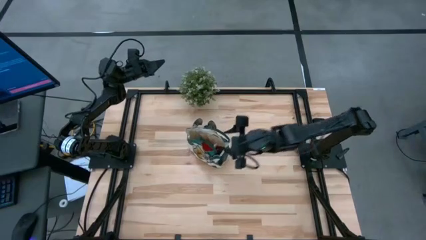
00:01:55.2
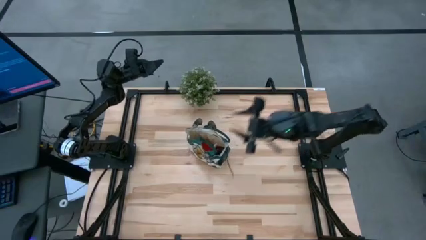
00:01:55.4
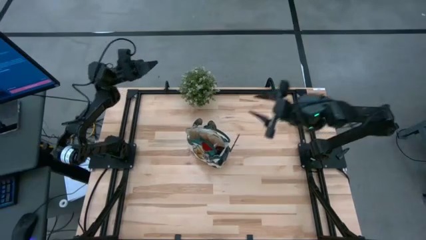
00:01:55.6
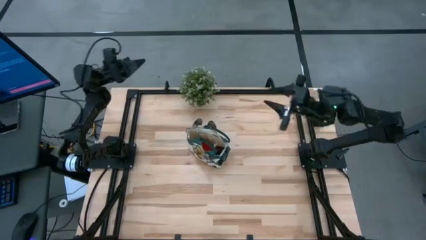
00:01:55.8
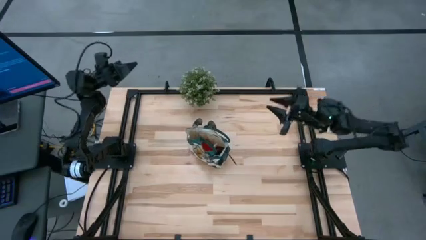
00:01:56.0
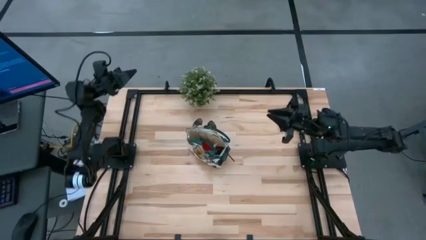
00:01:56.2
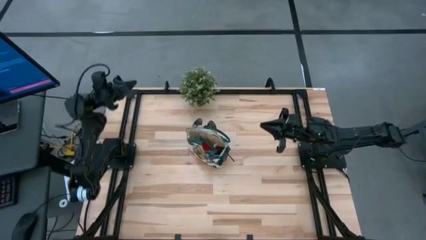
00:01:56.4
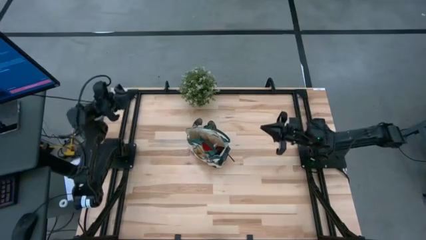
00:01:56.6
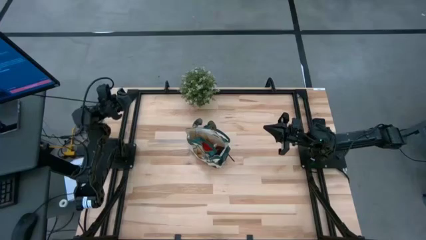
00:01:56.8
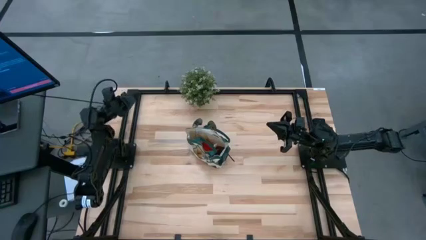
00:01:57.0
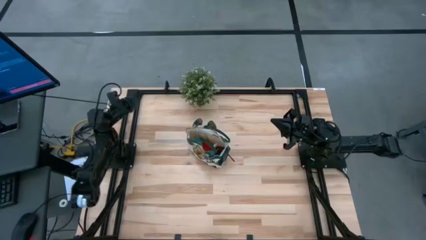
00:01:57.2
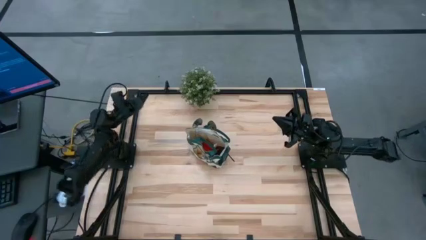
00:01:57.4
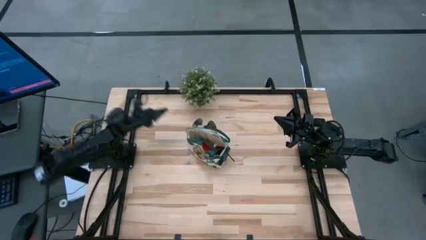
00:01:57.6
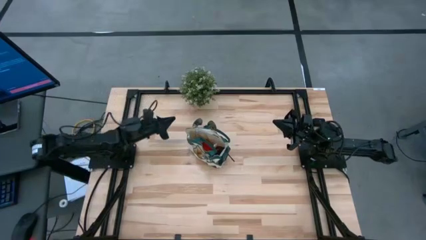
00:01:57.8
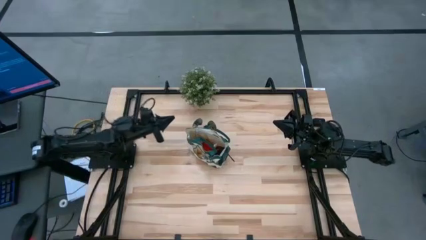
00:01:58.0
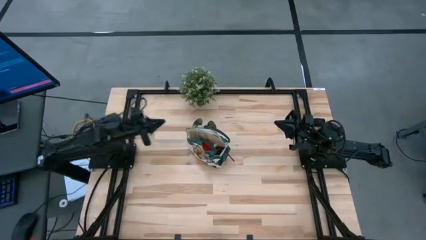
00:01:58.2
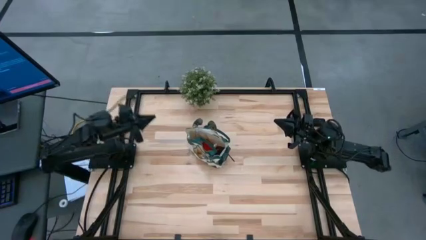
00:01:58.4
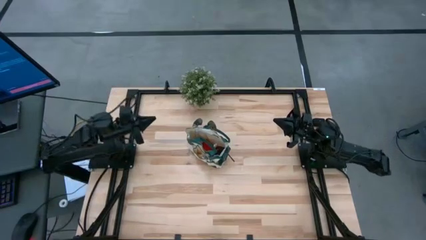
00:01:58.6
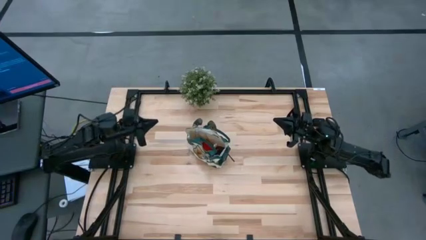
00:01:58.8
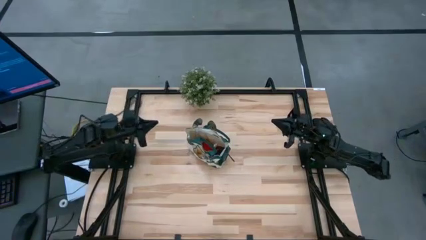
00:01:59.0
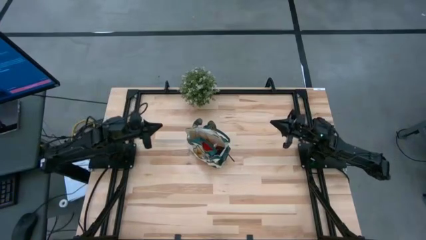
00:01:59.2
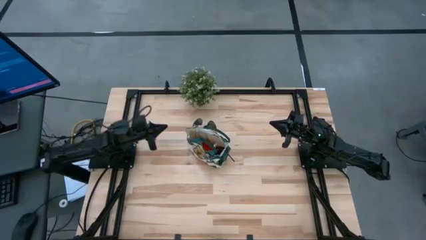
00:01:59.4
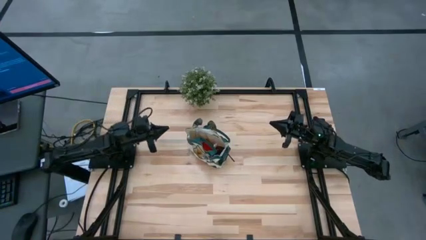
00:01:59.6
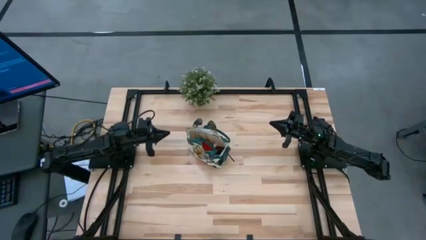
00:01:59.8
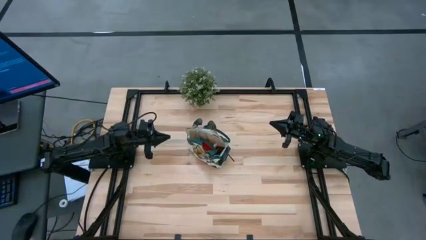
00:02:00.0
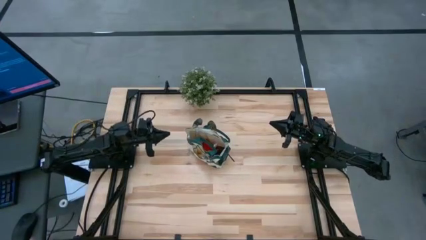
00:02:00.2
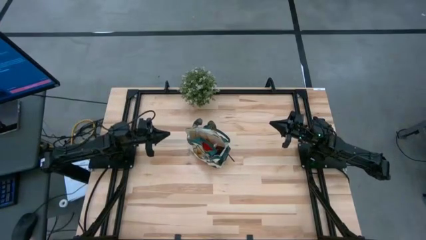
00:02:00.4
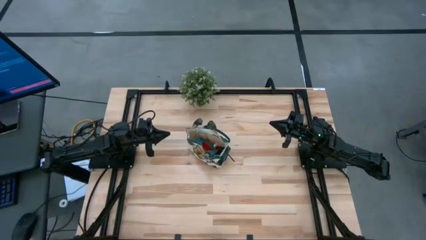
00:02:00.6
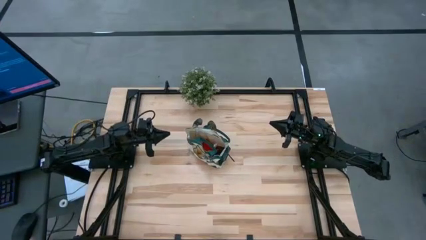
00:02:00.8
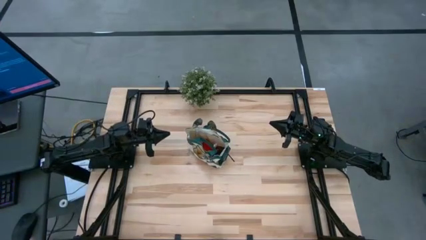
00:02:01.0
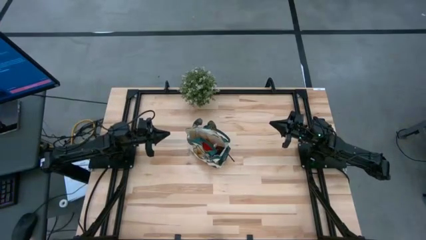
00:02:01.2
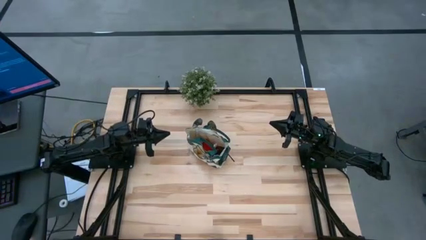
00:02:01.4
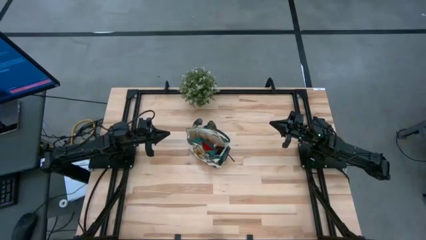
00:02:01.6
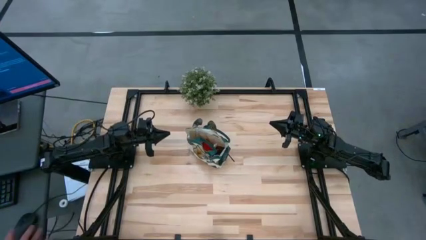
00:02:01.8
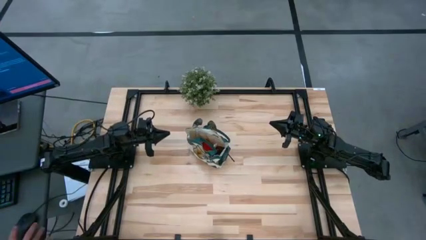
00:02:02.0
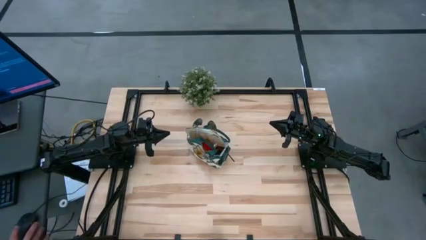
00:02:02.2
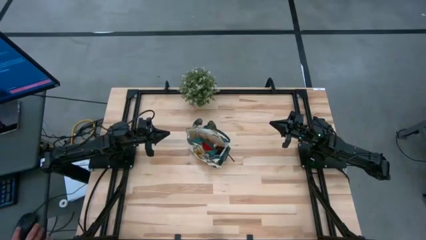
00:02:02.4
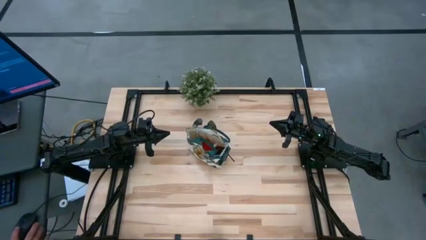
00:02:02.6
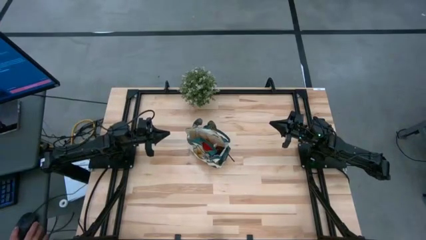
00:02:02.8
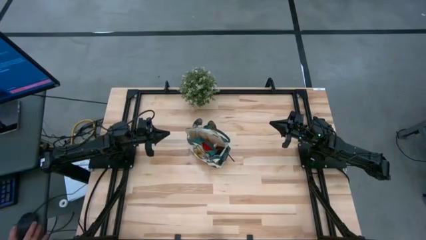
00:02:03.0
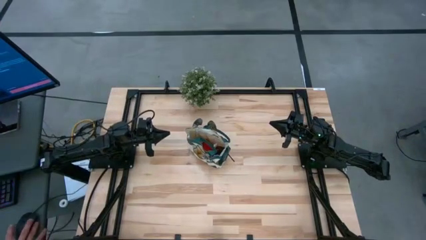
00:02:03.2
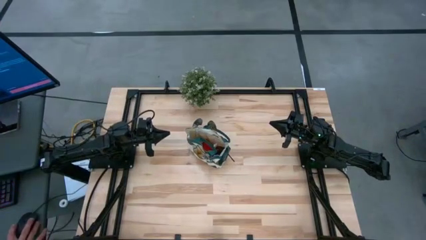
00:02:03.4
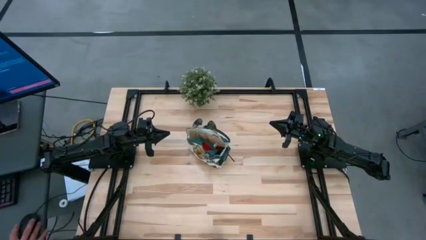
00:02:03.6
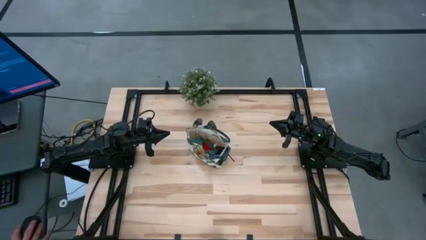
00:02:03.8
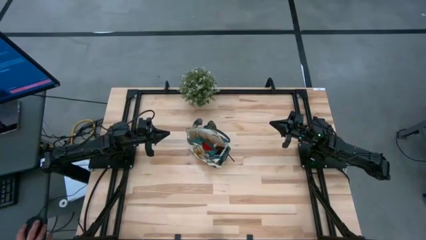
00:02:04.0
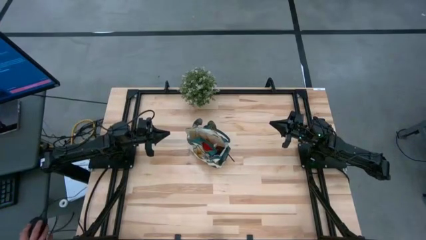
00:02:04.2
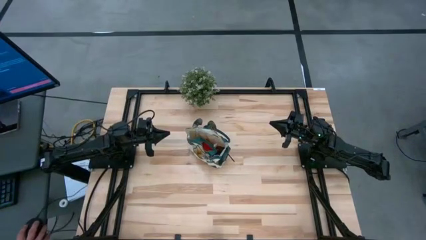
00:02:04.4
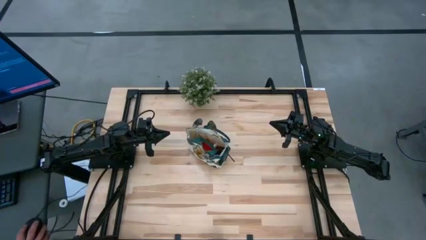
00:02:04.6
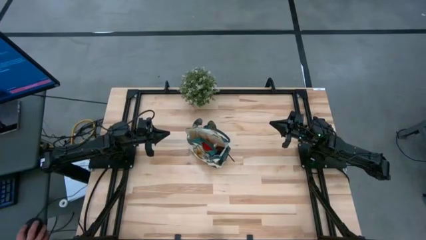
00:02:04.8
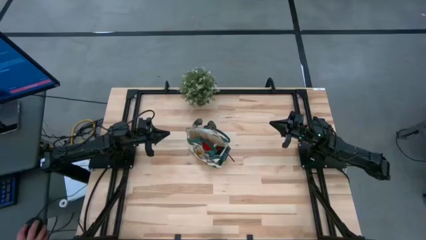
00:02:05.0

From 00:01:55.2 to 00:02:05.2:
Task: Pick & Place Garden tools in Gardening bag
Return to Home Position

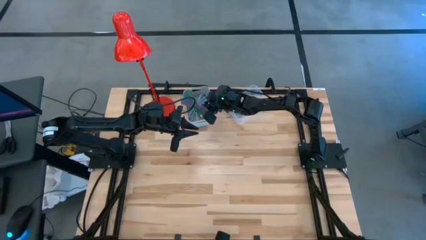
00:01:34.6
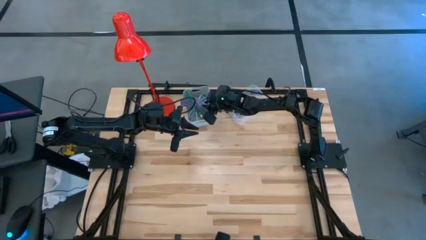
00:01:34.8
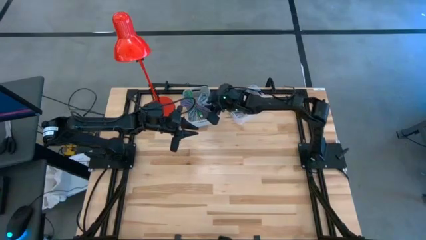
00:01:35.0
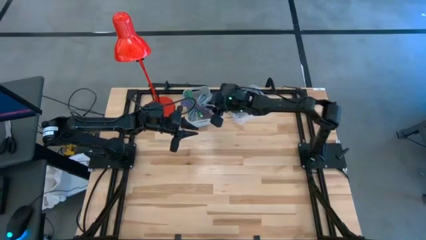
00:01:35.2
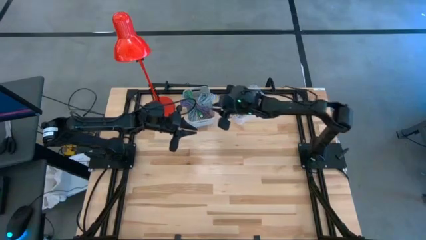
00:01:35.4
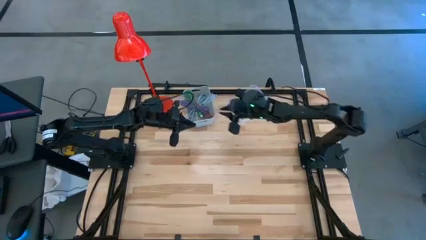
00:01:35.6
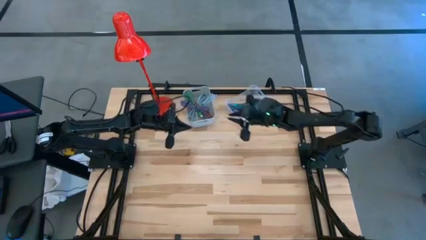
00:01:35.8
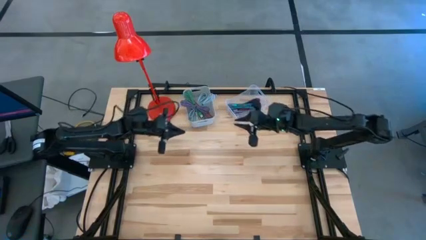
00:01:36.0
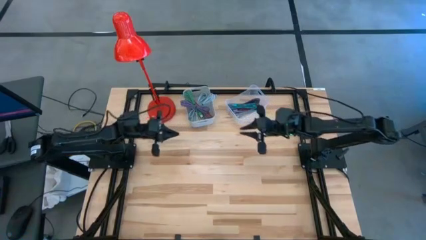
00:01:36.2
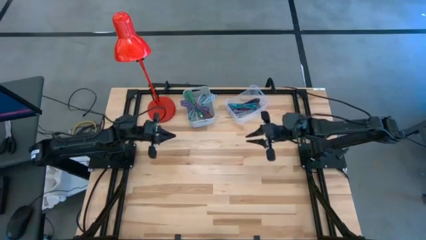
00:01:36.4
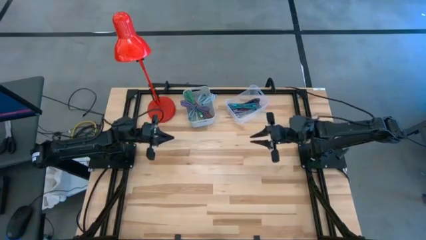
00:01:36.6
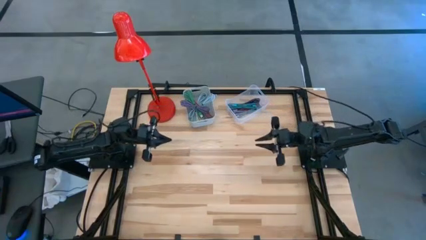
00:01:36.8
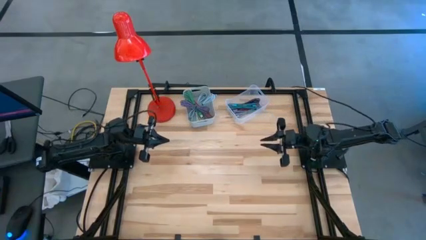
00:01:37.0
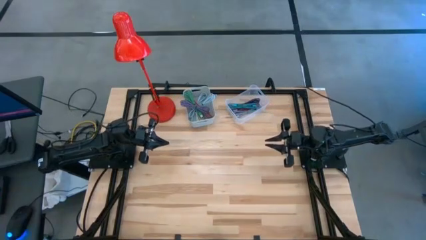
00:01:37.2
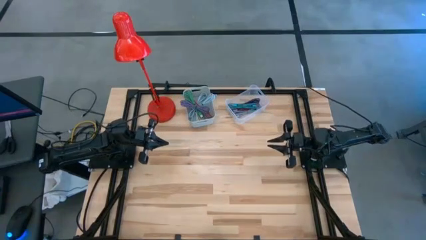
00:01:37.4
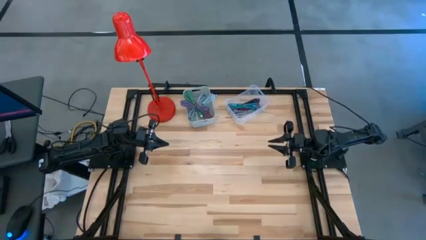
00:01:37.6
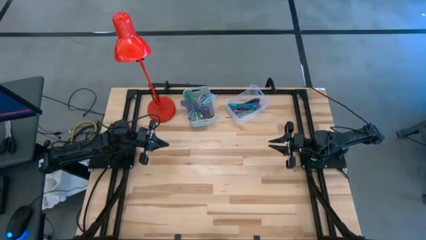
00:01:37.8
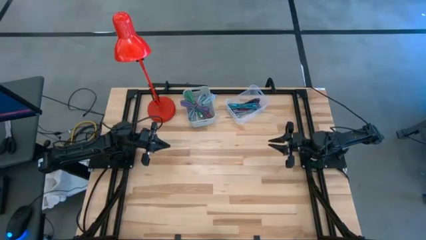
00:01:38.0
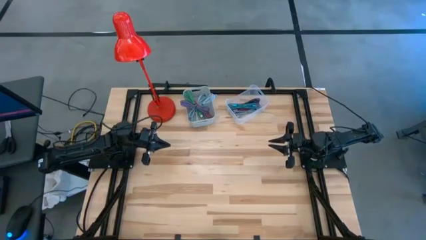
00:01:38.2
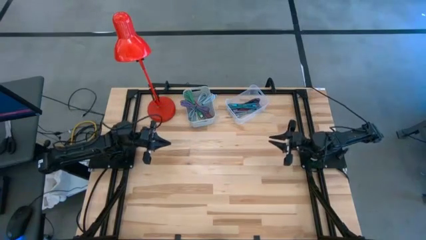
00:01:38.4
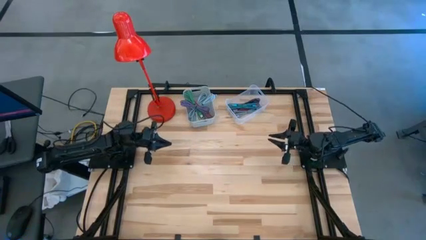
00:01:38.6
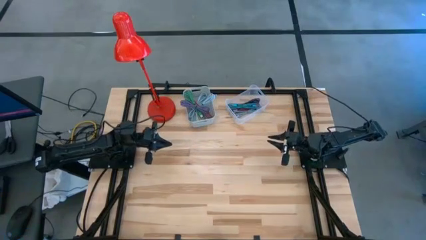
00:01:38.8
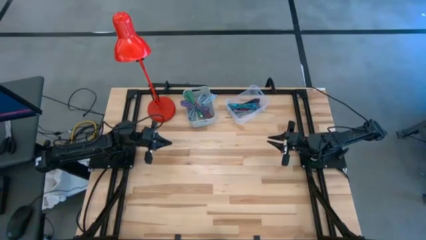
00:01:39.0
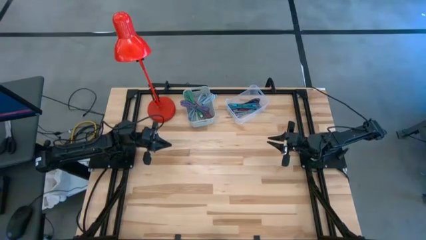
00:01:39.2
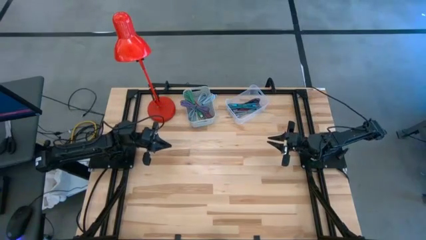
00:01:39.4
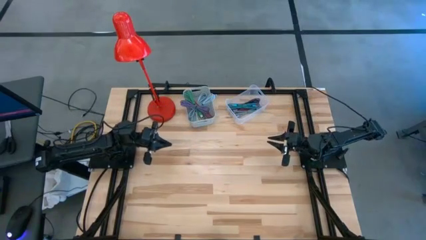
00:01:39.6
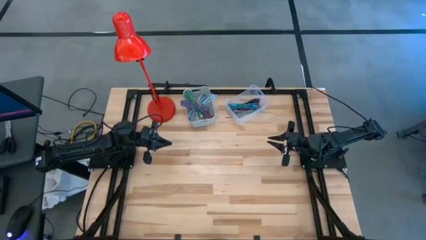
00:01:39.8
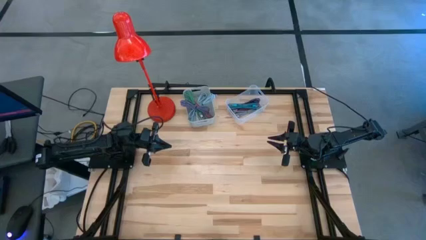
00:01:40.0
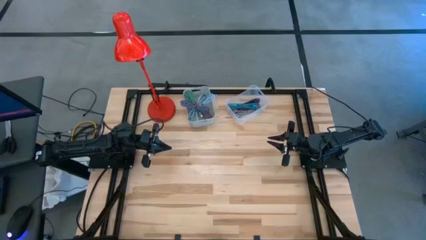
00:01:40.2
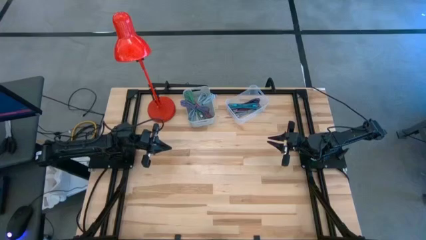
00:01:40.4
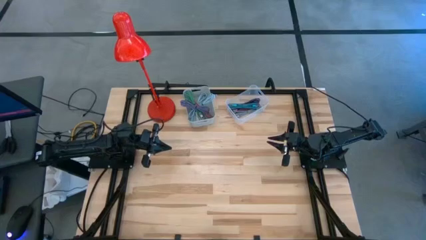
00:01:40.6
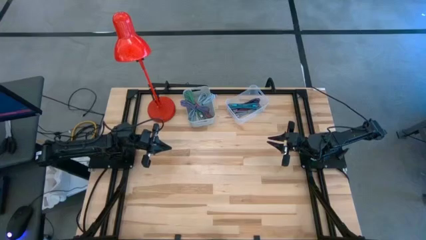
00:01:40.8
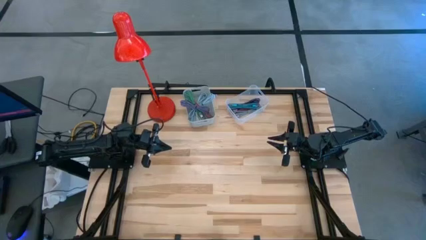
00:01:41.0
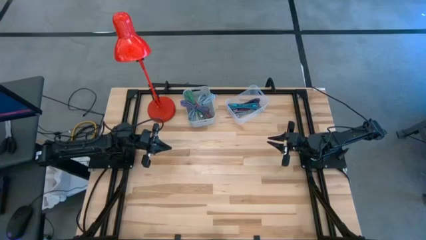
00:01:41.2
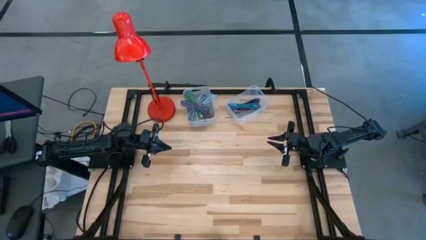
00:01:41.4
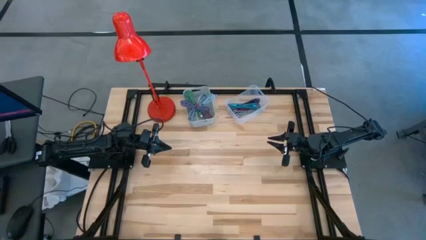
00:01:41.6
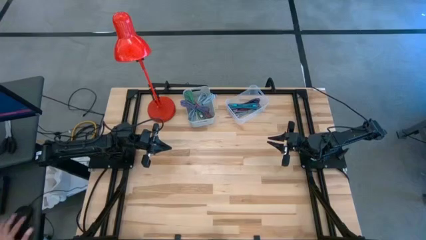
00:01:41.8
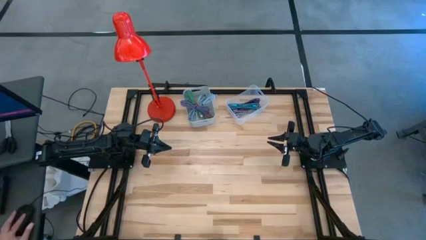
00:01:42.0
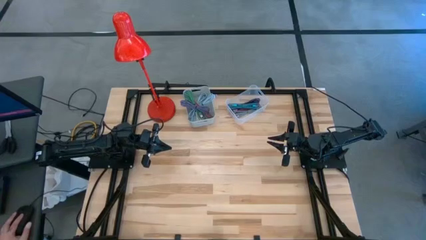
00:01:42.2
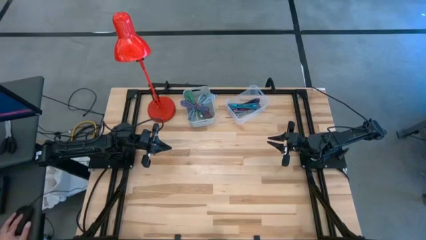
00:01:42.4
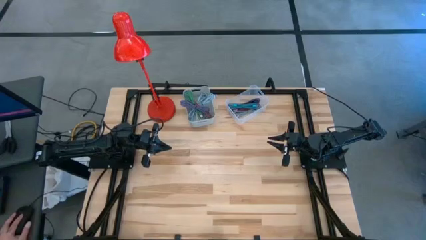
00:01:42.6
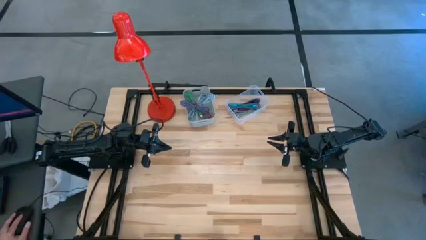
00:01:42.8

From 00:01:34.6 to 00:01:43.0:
Task: Pick & Place USB Port
Return to Home Position
